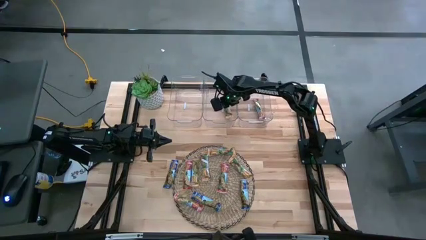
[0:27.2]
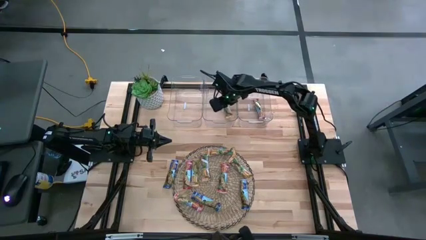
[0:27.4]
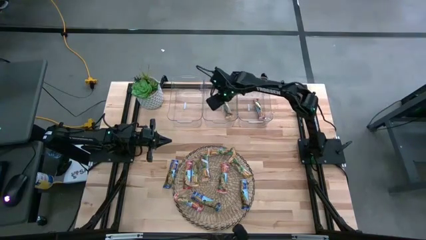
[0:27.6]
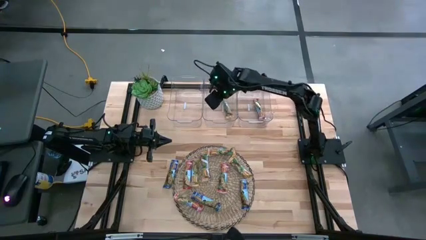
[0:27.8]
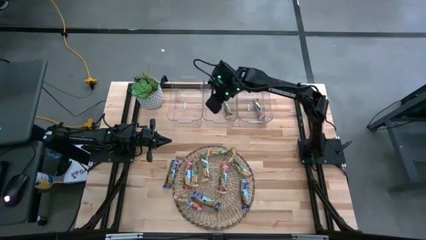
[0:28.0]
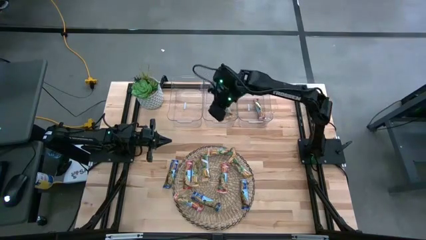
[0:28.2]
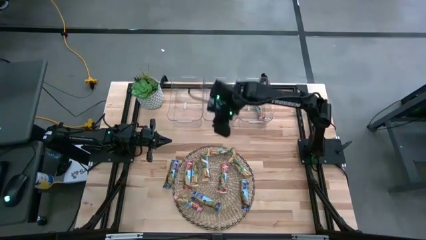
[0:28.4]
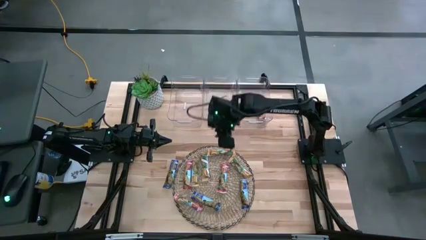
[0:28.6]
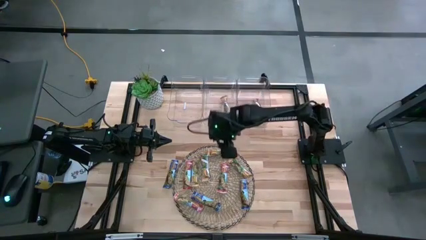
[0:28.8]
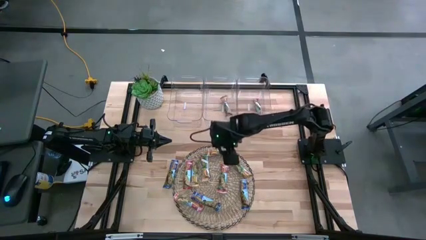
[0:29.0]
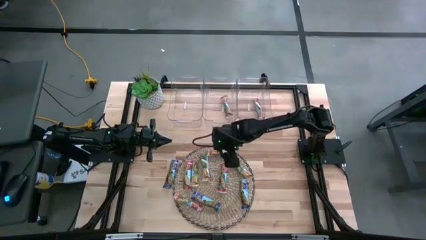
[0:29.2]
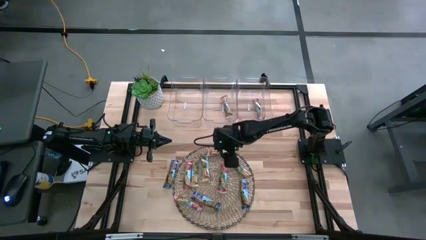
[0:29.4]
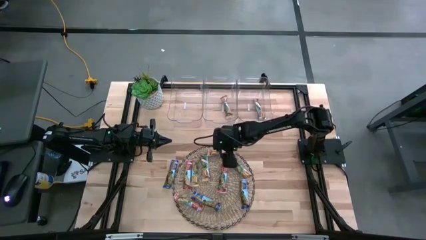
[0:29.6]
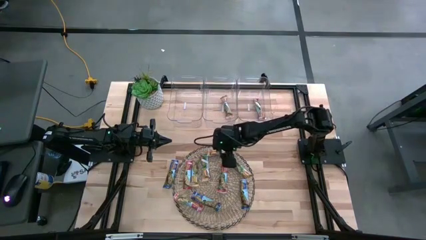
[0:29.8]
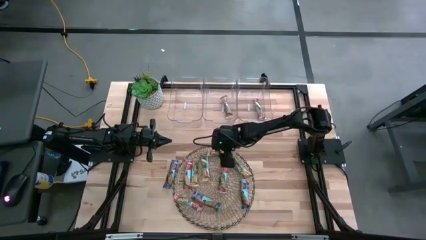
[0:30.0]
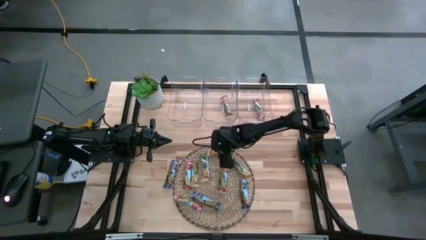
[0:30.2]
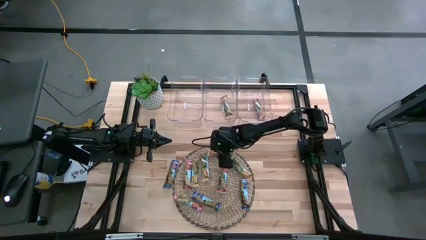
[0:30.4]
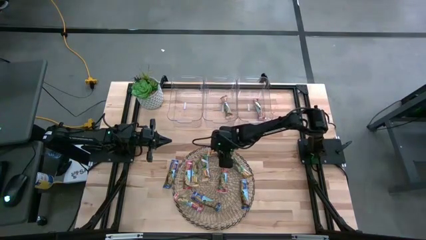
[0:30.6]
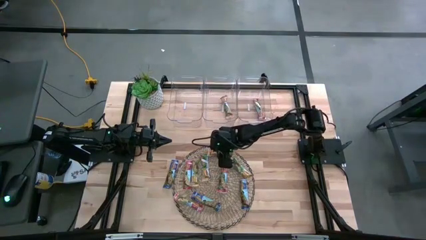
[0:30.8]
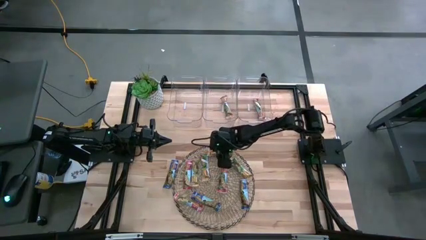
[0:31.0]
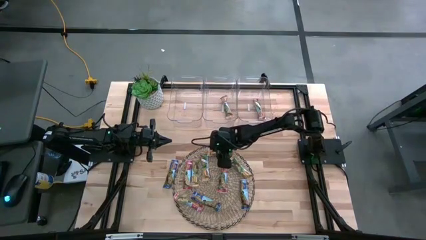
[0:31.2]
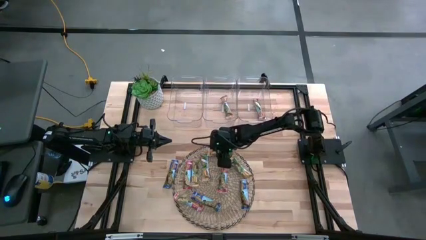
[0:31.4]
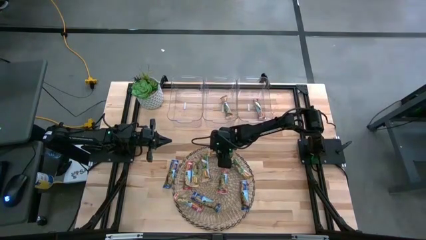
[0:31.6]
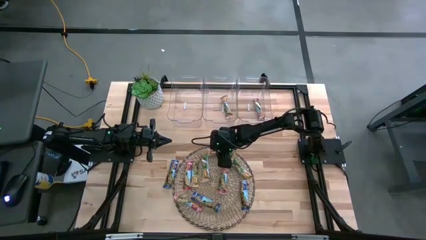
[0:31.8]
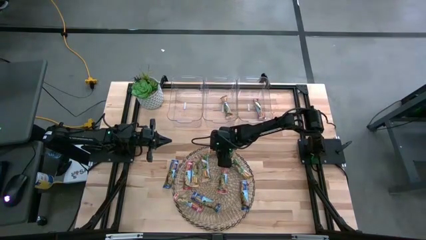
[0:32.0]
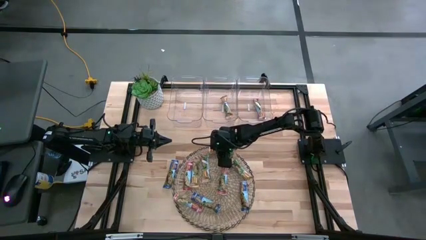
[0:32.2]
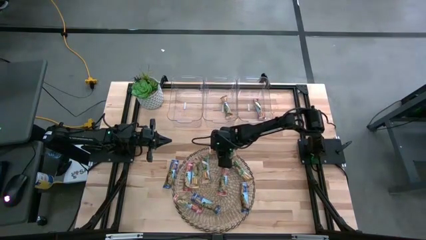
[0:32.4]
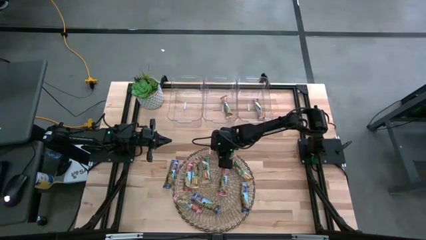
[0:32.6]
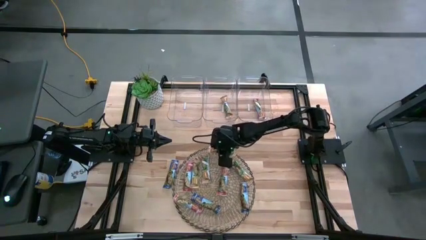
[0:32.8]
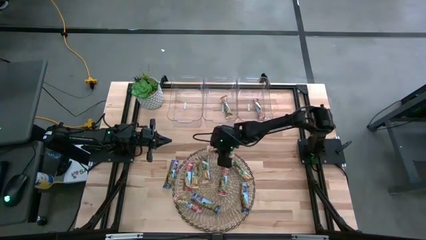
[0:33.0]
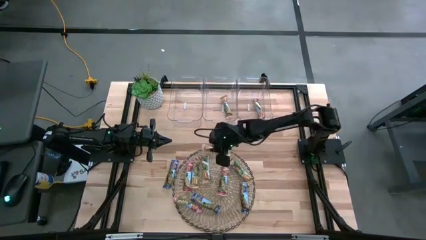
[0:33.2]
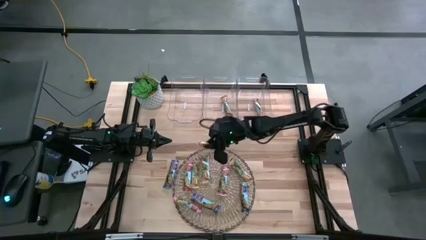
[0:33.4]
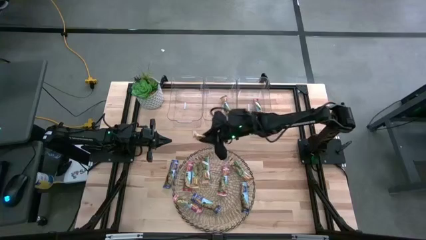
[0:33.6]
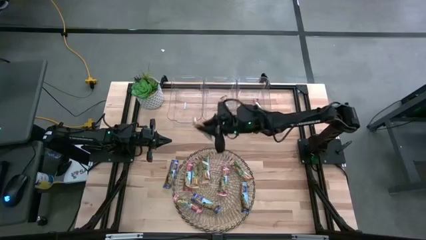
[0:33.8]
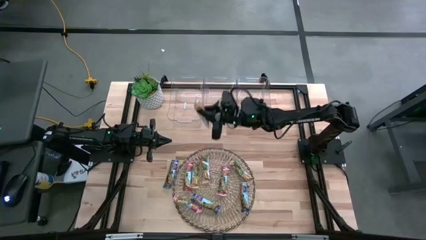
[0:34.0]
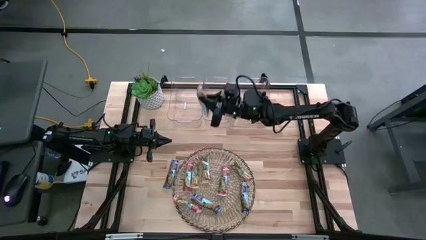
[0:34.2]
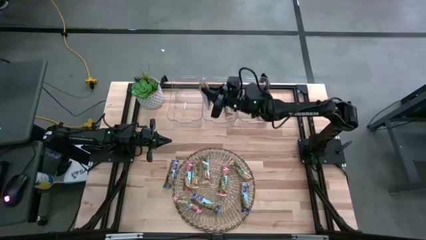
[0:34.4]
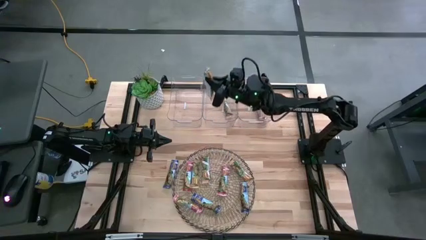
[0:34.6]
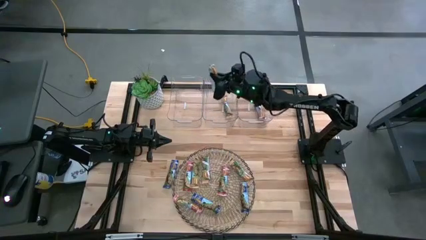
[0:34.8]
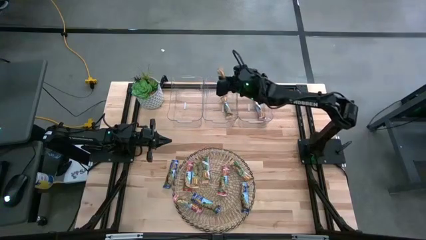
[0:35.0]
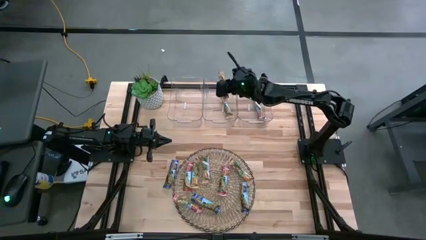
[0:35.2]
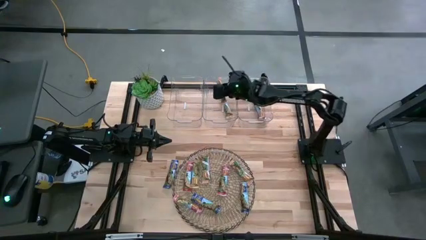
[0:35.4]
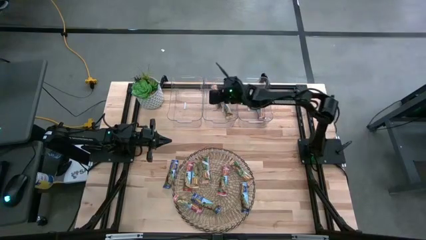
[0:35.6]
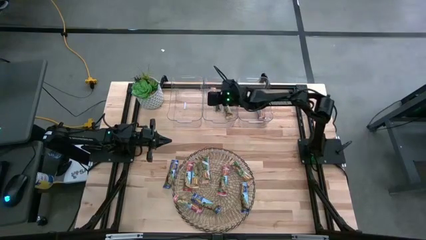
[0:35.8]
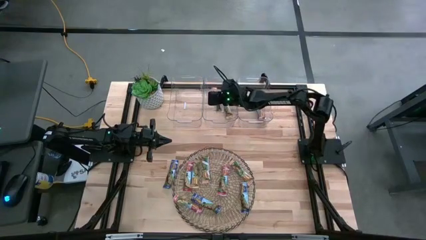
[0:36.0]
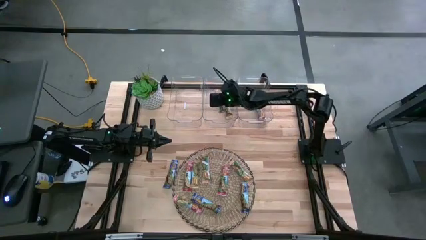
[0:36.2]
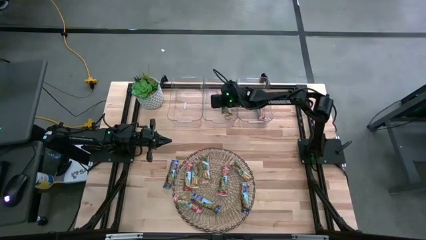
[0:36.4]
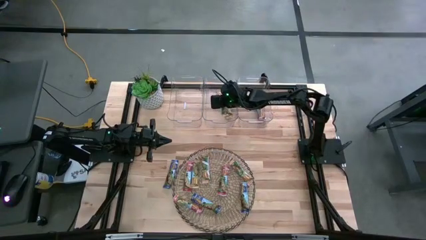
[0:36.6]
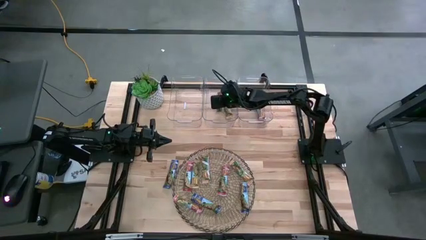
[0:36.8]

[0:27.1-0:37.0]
Task: Pick and place Granola Bars by type
Put the yellow granola bar into the middle transparent bin

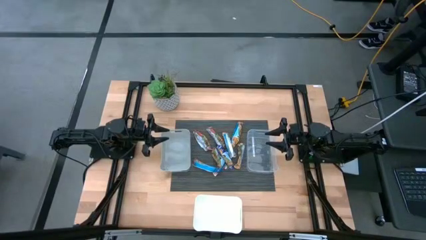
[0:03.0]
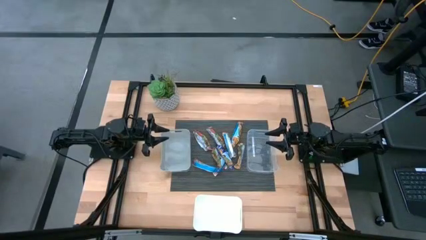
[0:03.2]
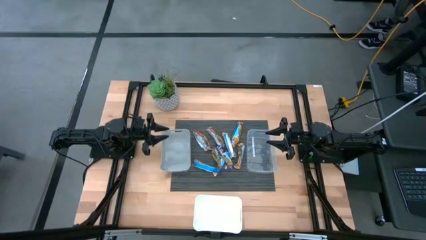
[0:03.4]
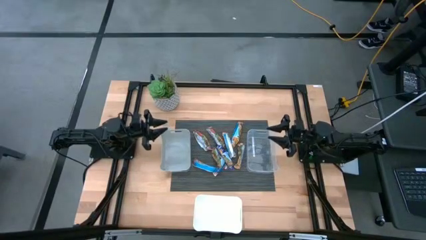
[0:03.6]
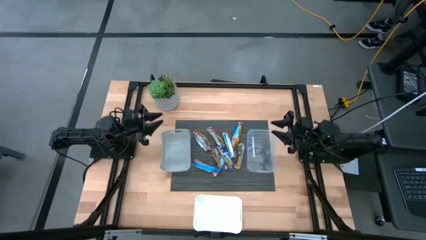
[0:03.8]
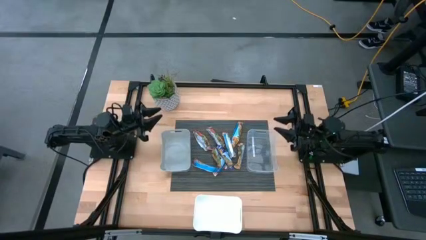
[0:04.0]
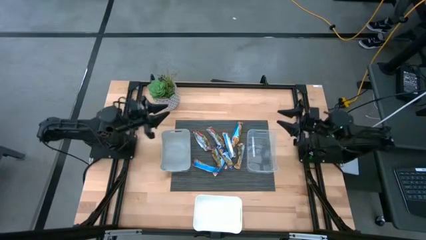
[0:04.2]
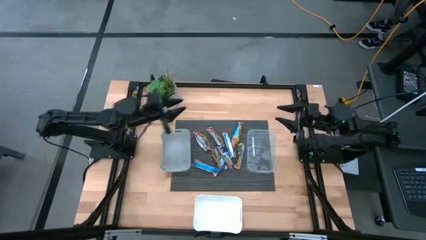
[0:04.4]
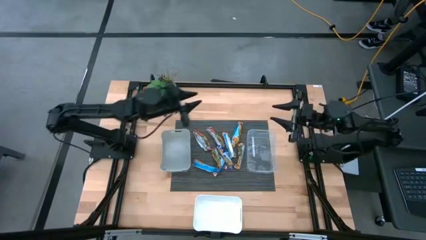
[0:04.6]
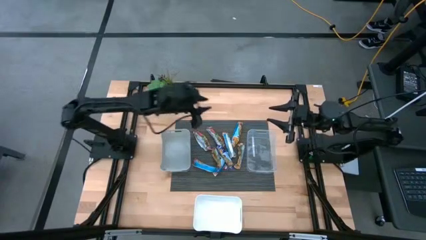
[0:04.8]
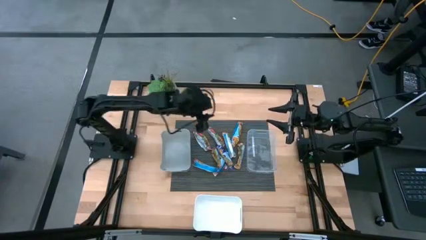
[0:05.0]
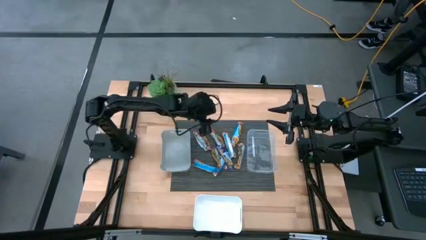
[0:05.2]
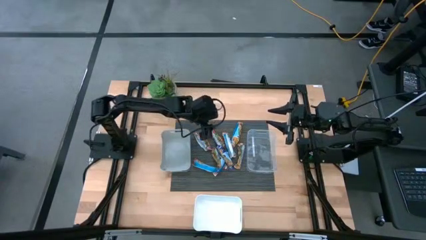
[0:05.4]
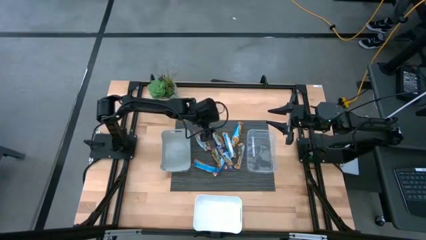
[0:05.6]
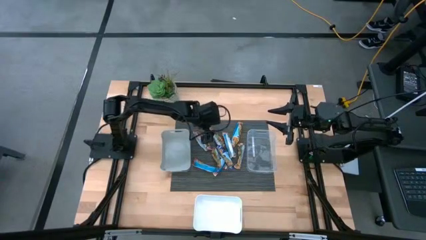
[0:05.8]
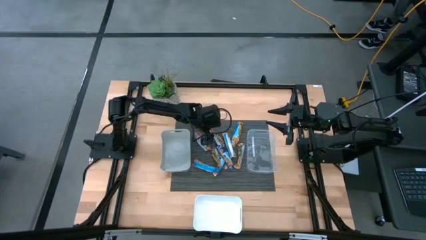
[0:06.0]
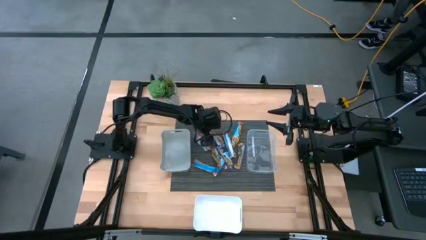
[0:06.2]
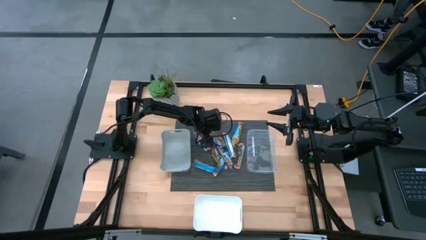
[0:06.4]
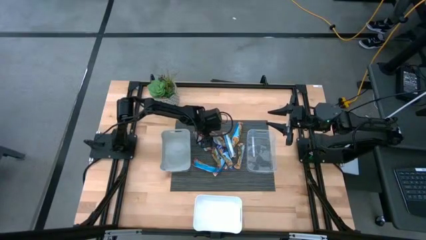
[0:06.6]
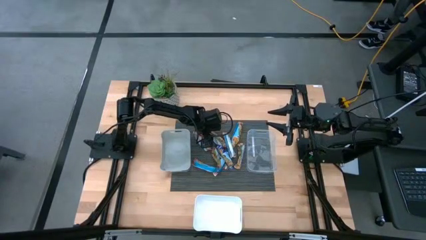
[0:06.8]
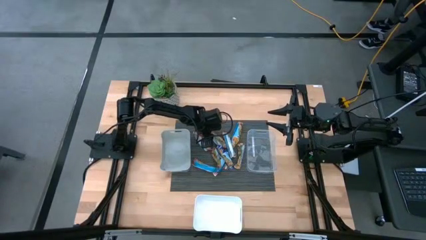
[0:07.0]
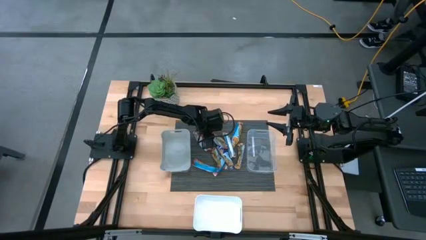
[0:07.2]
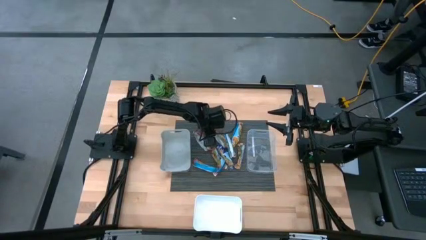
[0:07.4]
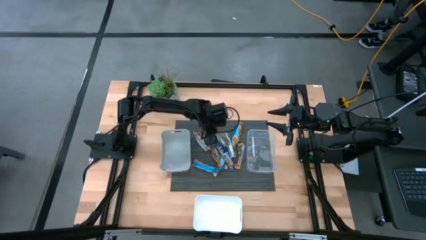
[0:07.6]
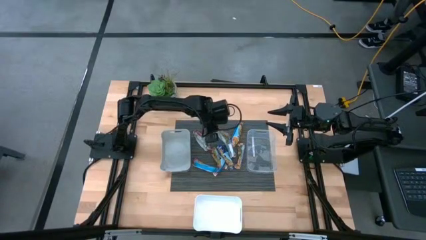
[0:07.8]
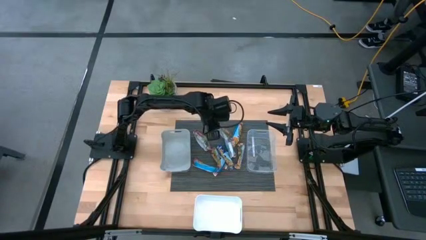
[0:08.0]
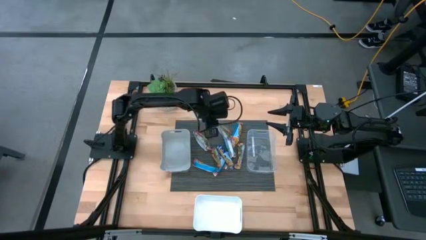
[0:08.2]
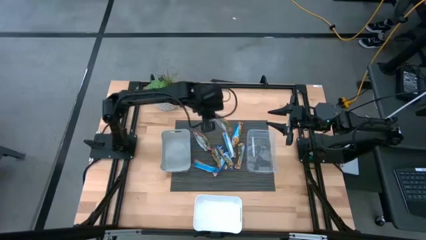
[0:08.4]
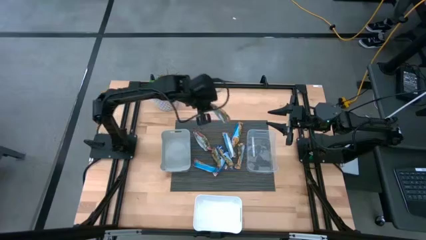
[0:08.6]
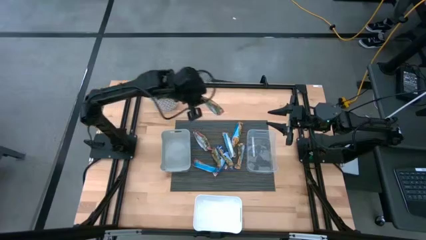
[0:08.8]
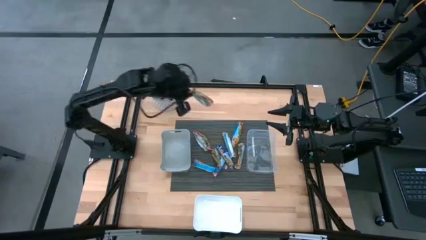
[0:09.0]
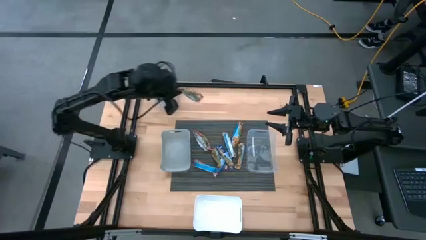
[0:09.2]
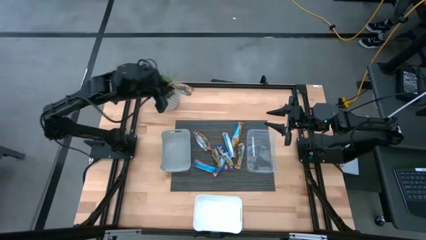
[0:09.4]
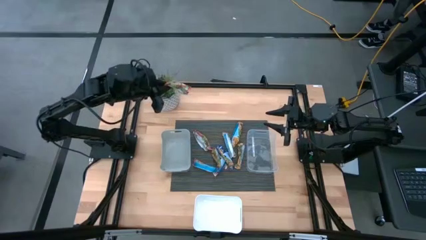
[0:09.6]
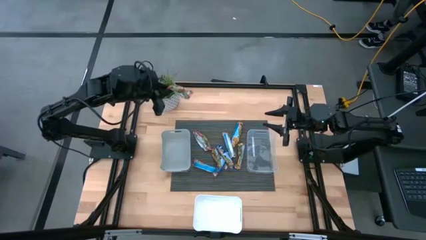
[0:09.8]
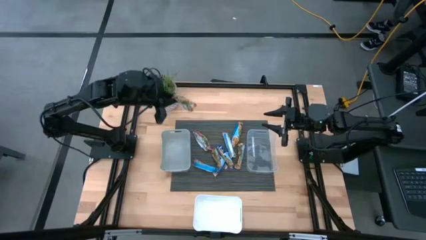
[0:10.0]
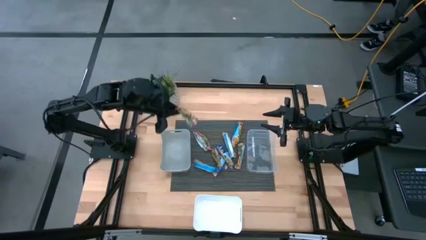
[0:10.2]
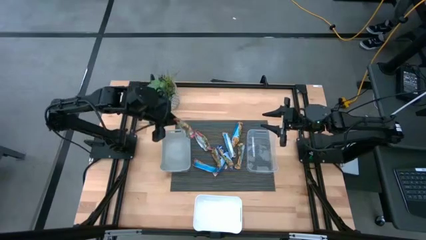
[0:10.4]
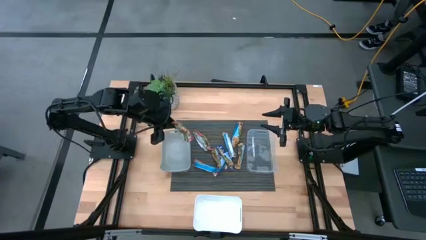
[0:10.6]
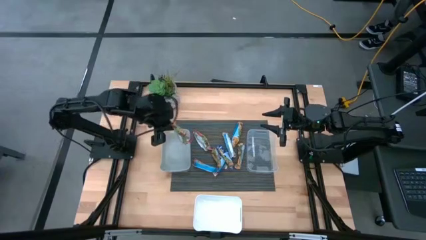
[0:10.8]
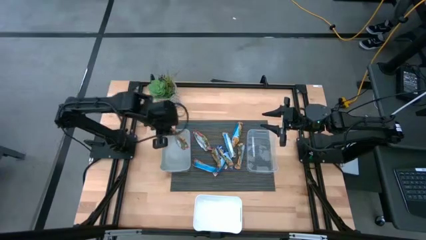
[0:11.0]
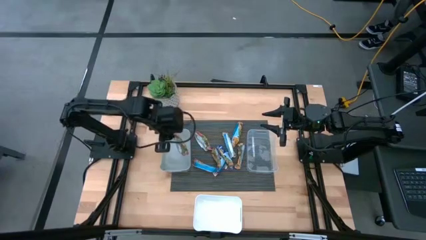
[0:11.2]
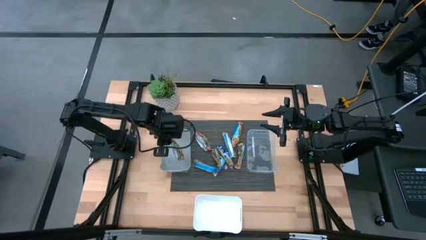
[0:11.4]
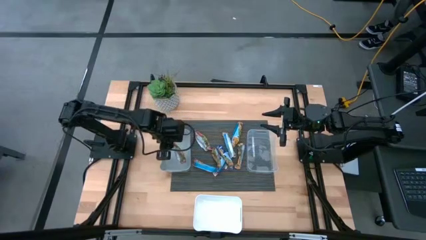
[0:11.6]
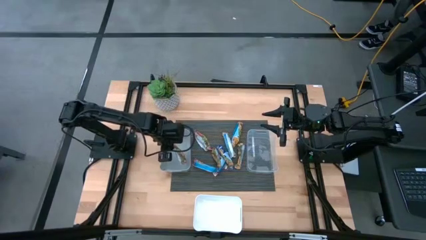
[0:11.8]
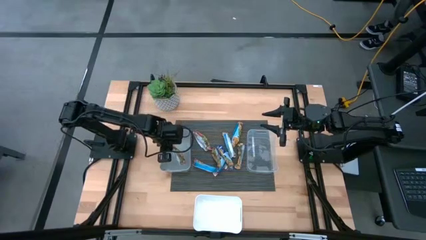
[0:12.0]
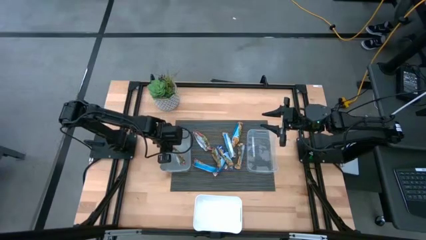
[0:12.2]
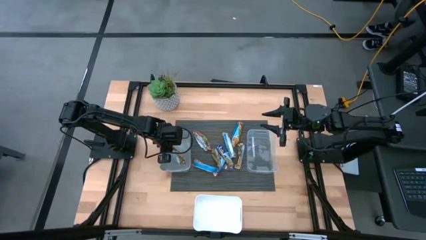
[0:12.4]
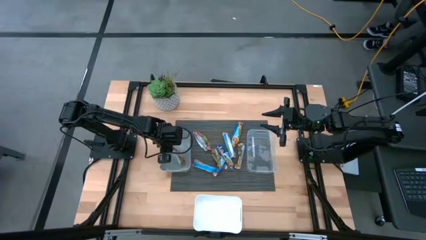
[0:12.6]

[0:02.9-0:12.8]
Task: Pick and place Granola Bars by type
Put the red granola bar into the gray bin
